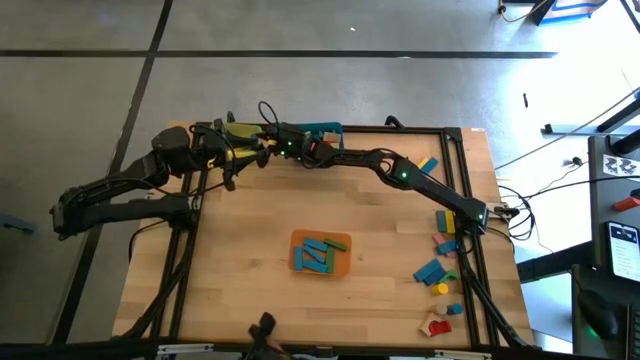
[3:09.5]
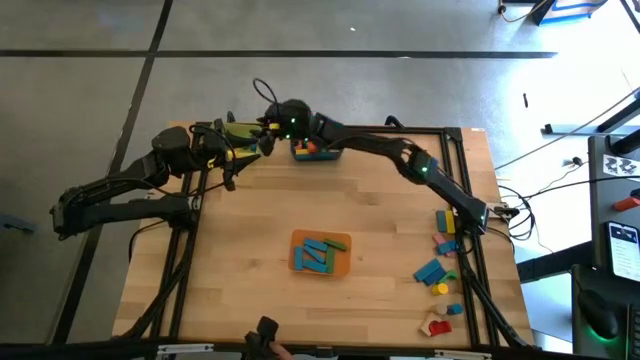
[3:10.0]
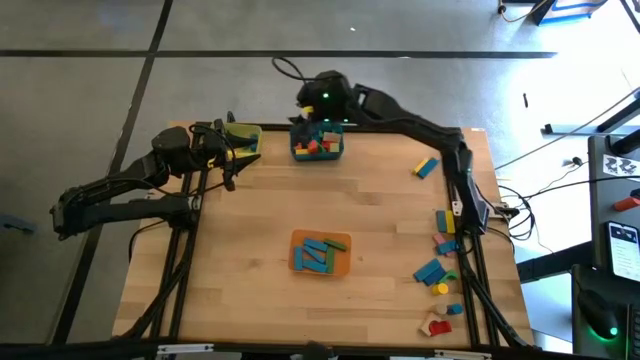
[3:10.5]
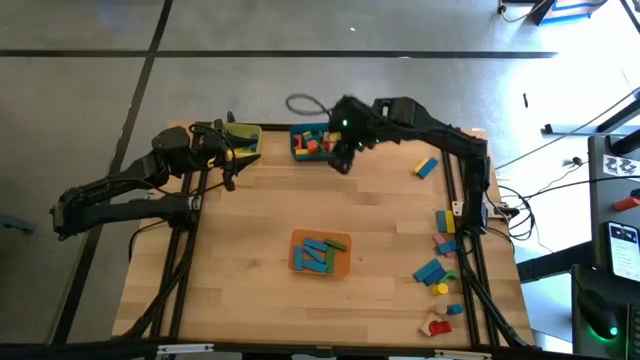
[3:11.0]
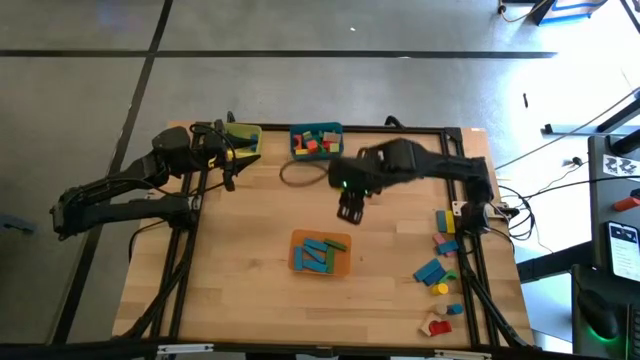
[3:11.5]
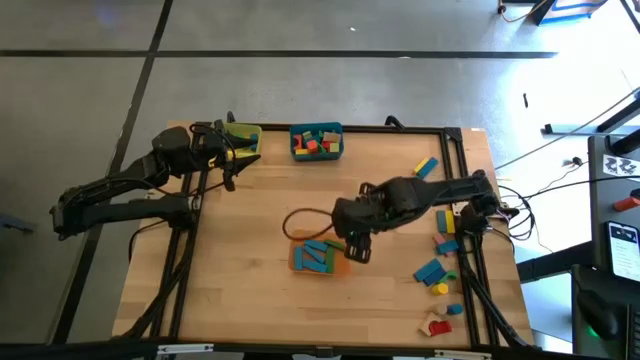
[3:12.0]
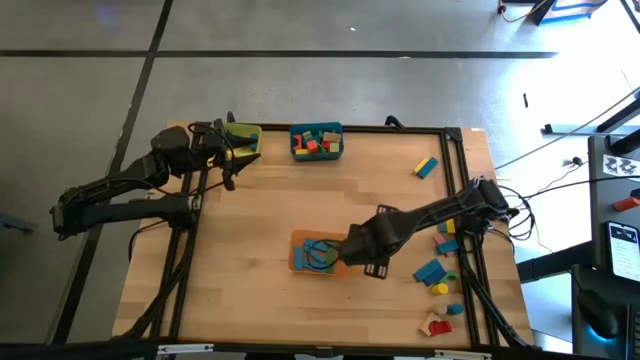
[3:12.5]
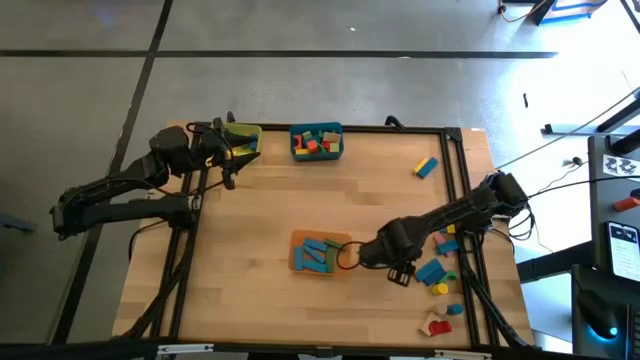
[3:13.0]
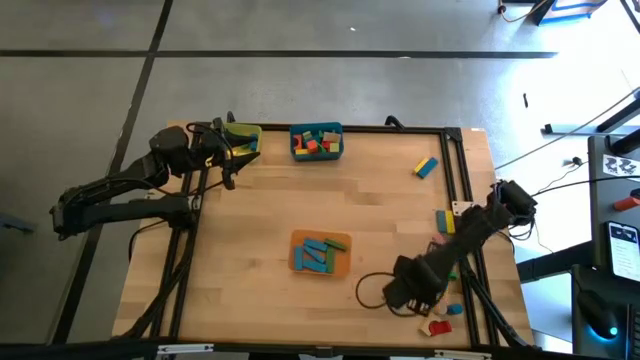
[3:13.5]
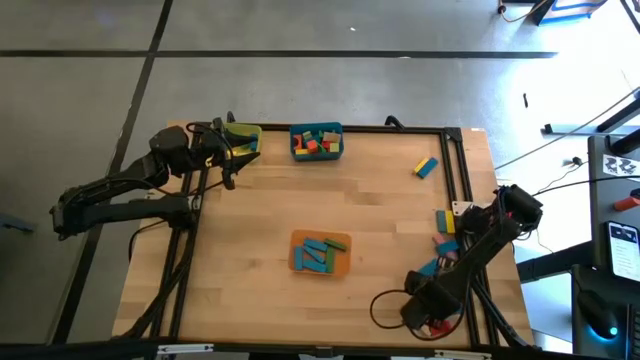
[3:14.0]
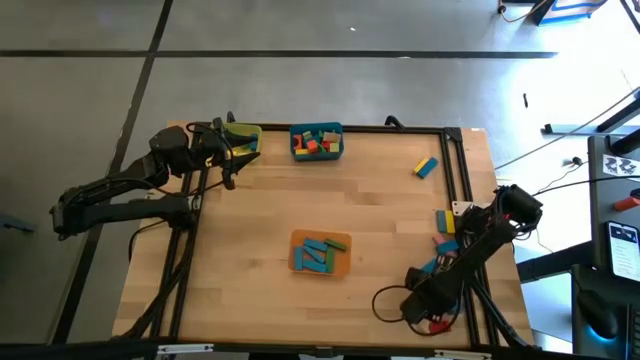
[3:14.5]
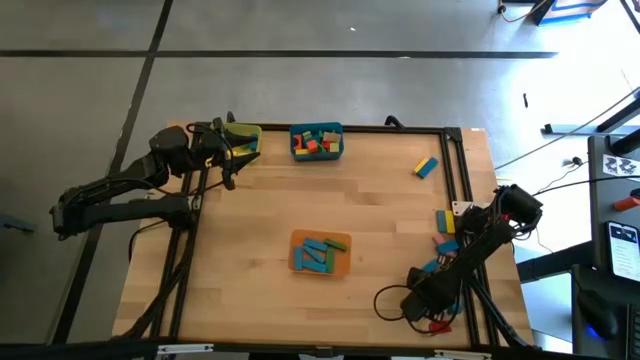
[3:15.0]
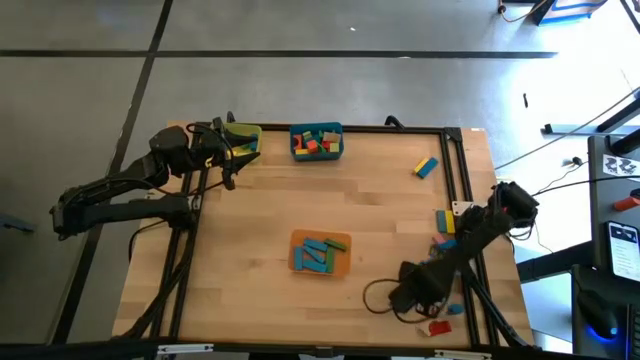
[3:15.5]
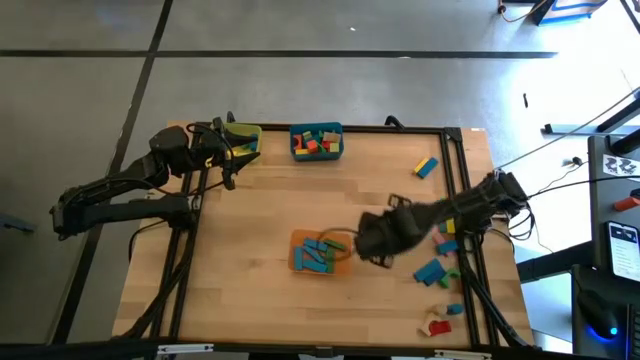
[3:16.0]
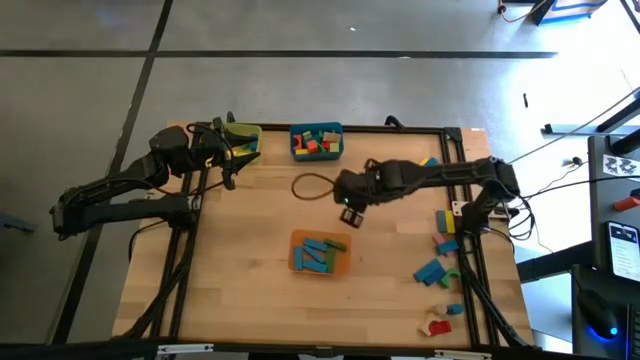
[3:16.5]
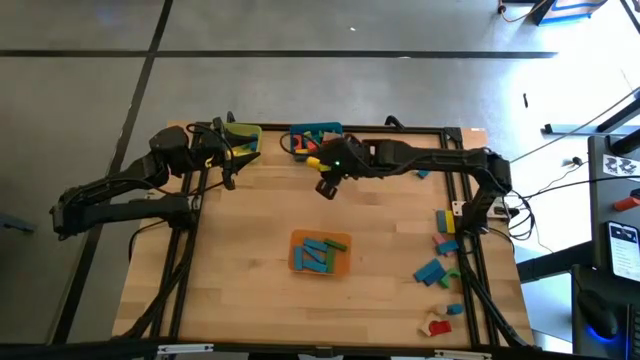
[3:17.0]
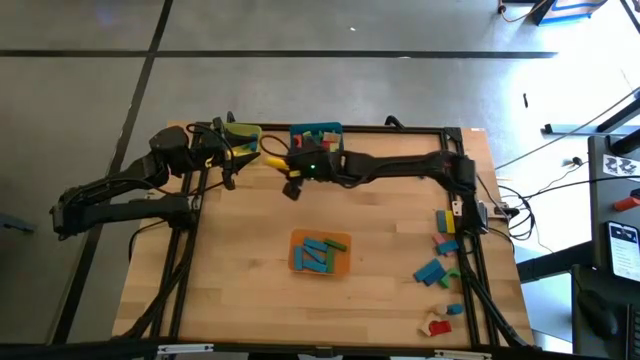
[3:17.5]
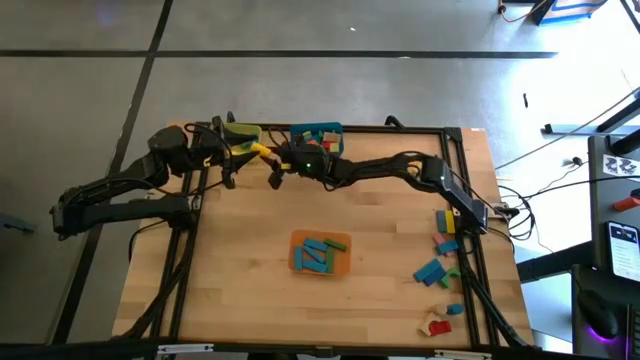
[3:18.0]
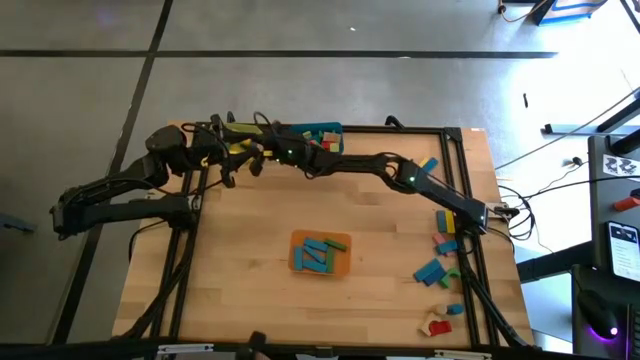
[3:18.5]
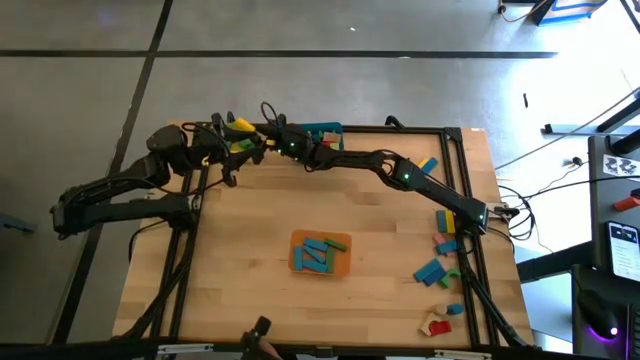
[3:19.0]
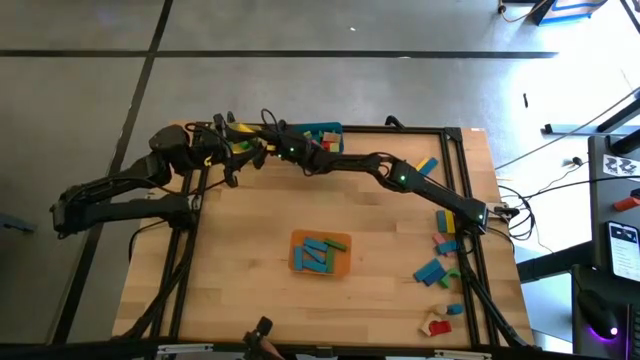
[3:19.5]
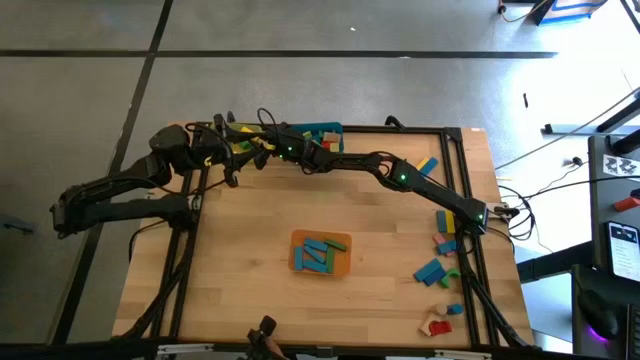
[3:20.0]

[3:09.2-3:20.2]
Task: Sort blocks by size
Put the yellow cylindrical block into the yellow bin

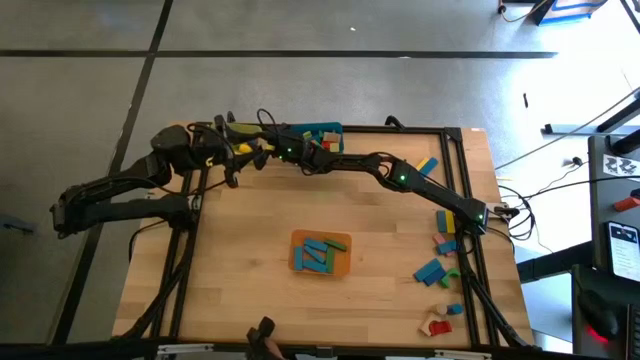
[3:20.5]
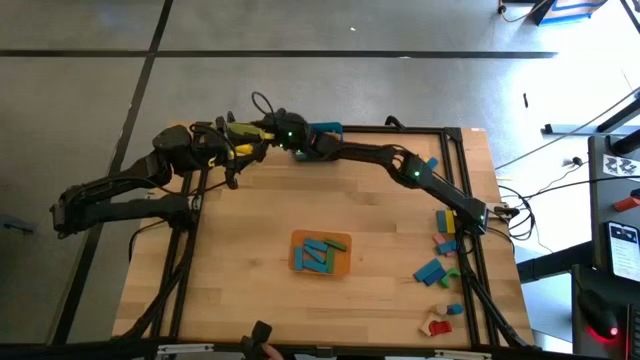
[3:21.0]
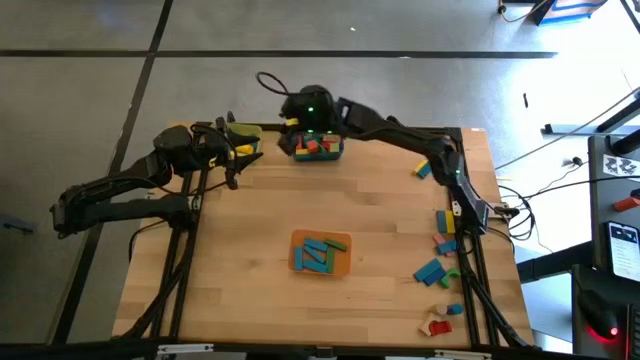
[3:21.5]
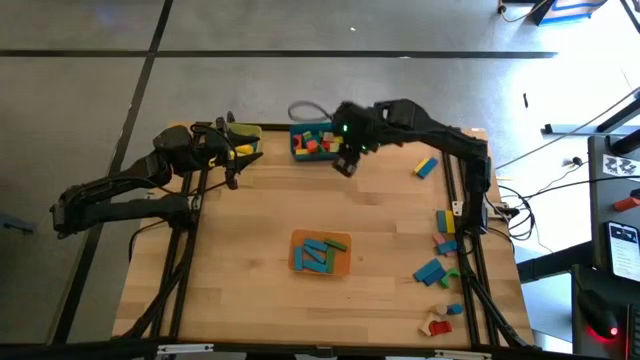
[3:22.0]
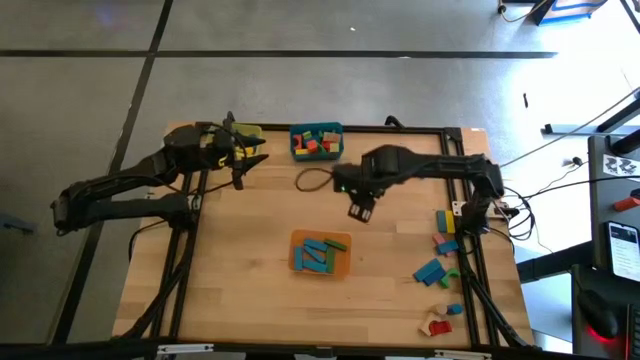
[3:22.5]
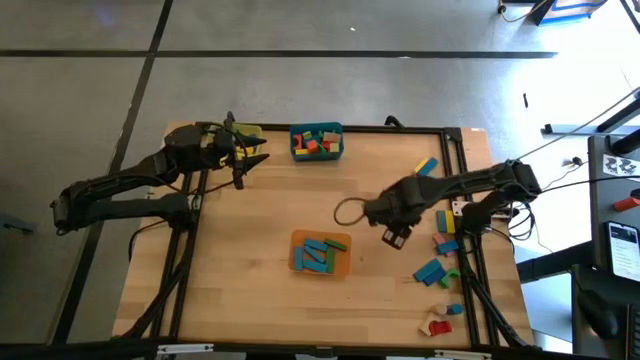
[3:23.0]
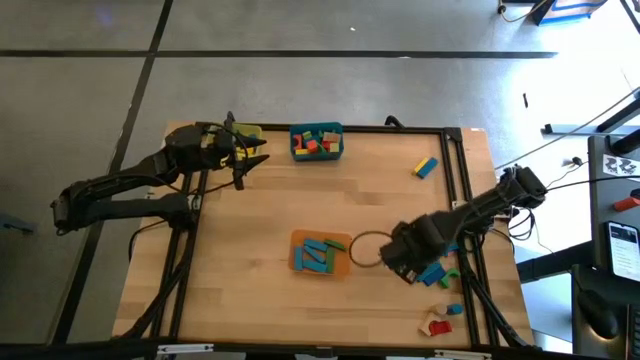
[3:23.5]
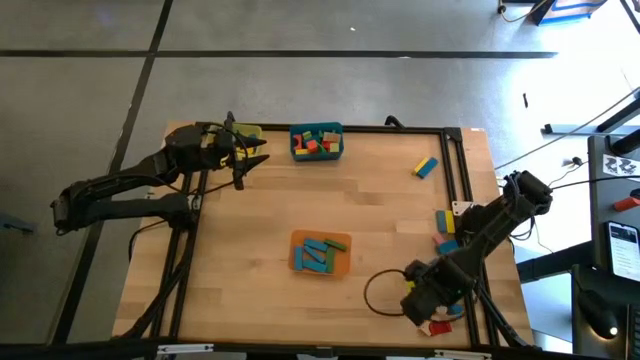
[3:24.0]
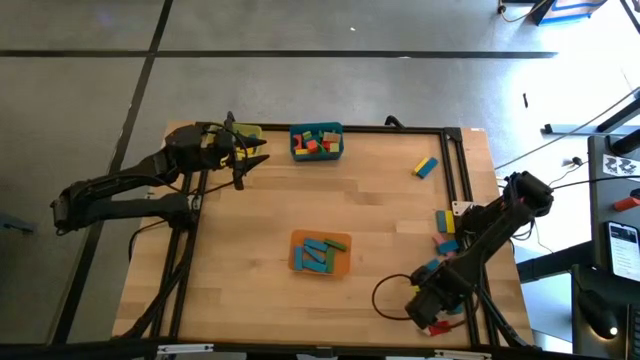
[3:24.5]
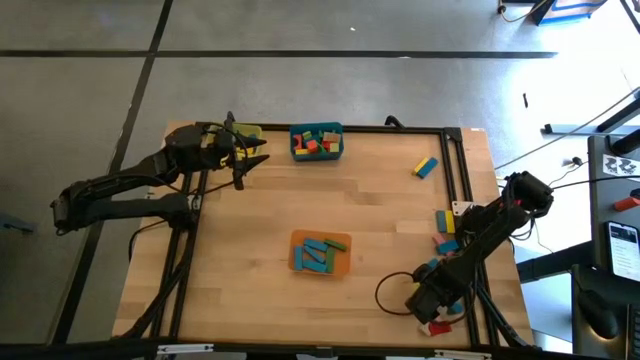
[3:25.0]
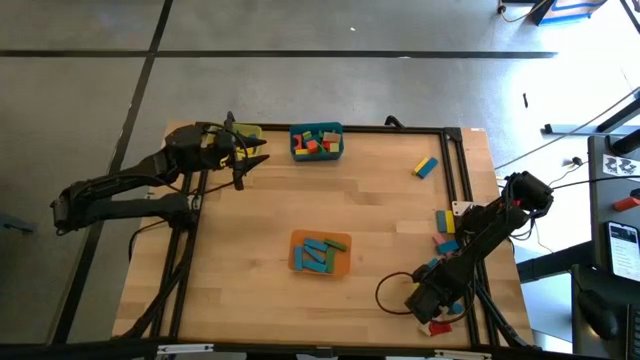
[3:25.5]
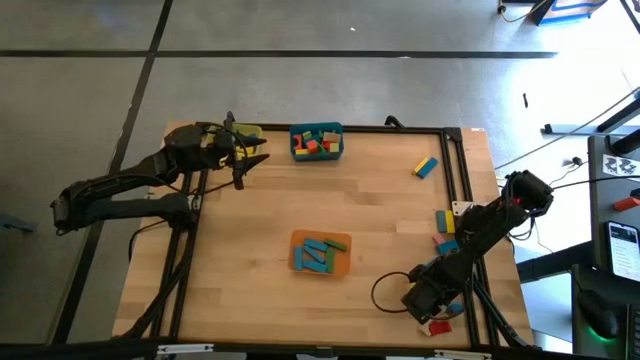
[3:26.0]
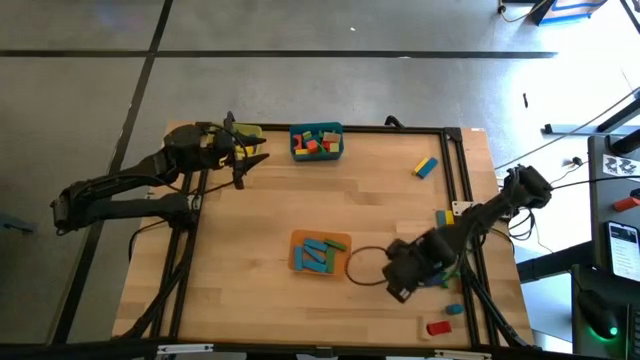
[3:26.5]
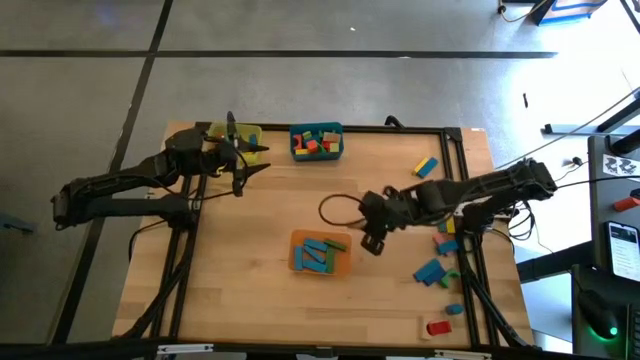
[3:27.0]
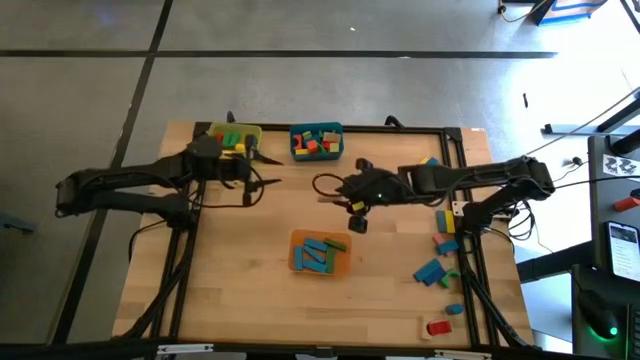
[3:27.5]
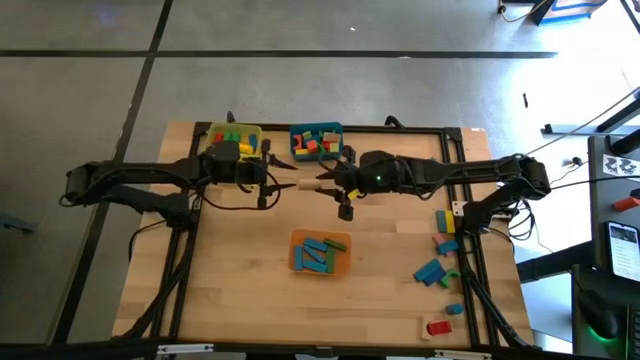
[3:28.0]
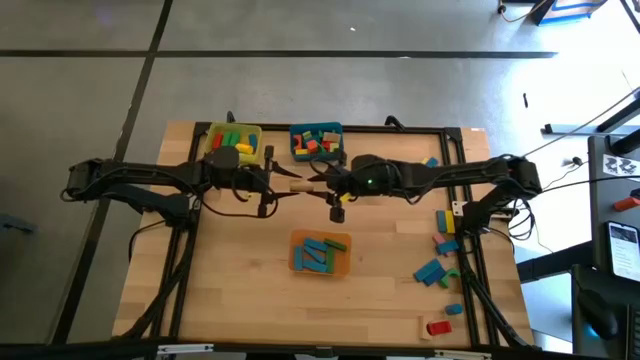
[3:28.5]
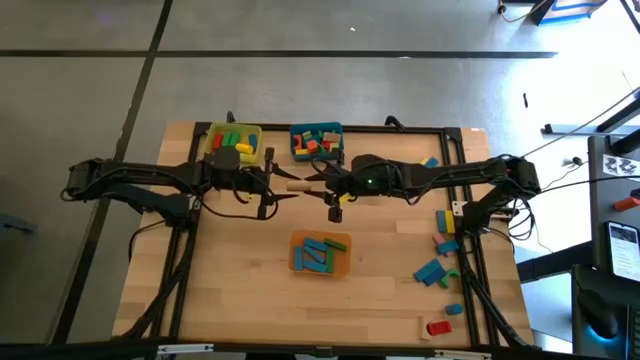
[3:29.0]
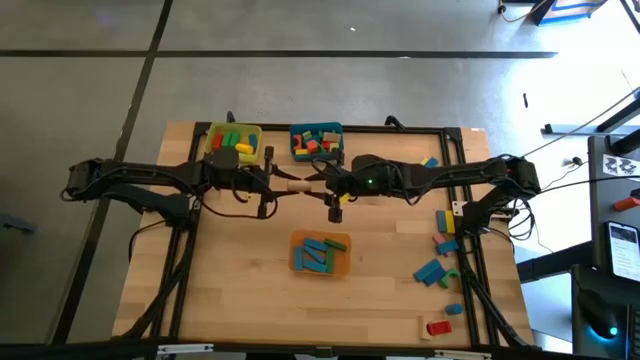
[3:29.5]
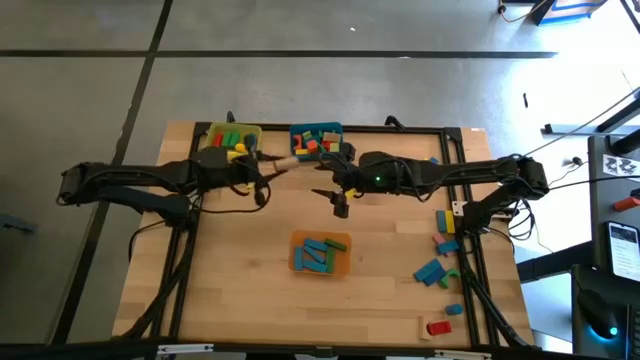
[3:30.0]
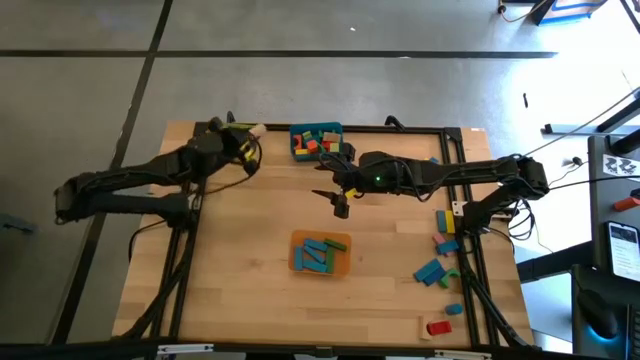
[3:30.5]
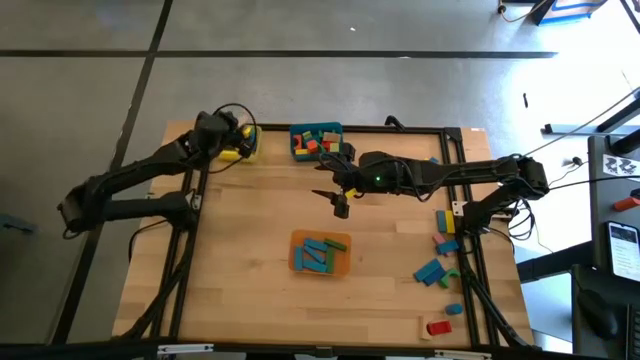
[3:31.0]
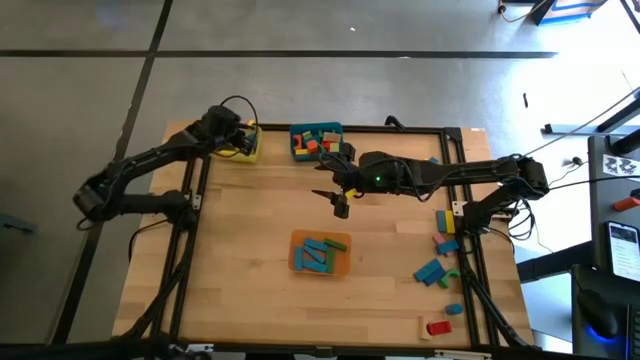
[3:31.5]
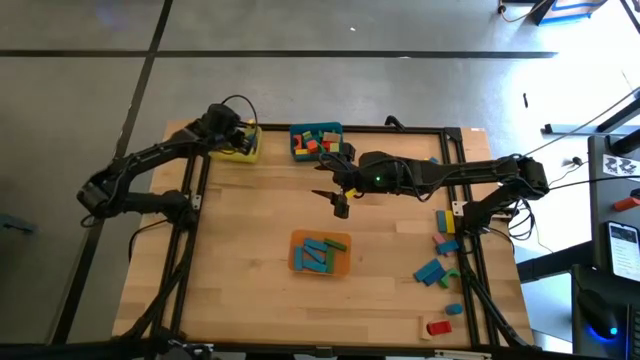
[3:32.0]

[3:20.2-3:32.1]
Put the brown cylindrical block into the yellow bin
